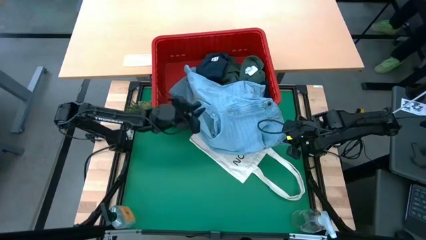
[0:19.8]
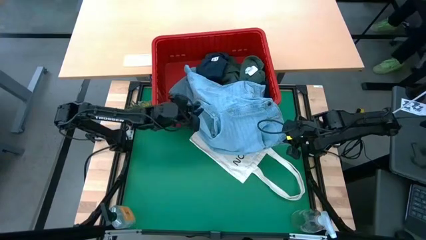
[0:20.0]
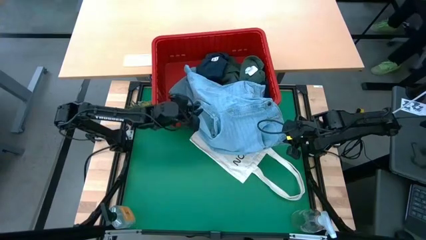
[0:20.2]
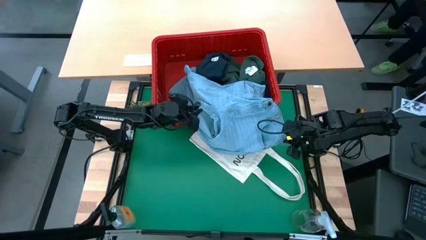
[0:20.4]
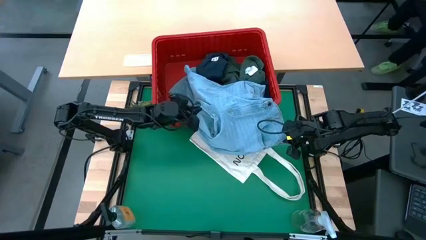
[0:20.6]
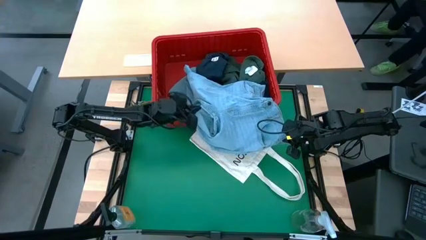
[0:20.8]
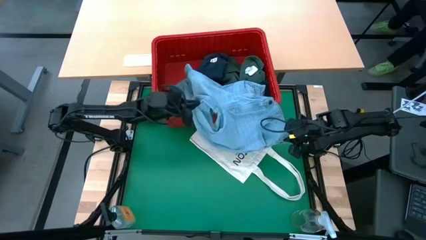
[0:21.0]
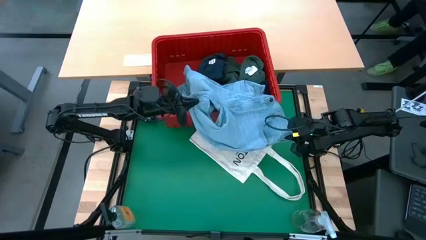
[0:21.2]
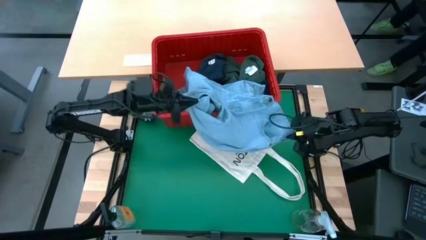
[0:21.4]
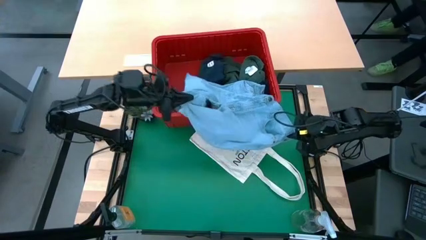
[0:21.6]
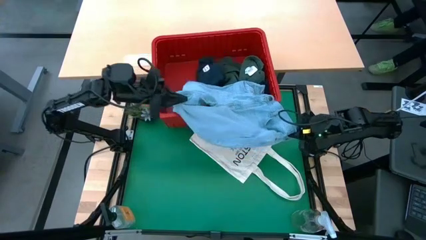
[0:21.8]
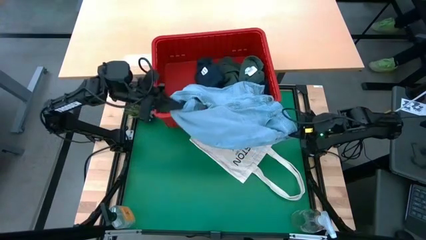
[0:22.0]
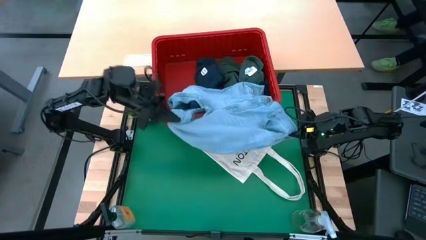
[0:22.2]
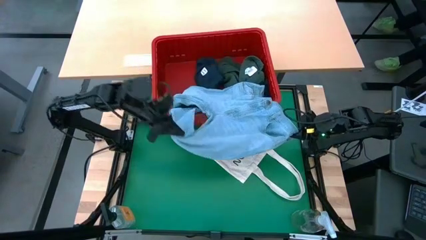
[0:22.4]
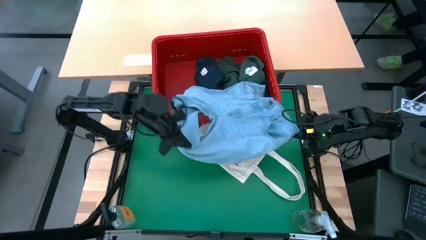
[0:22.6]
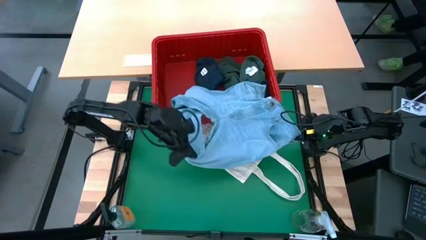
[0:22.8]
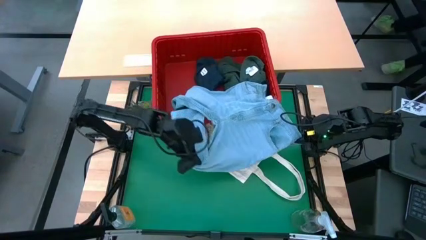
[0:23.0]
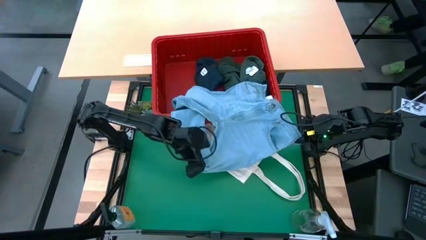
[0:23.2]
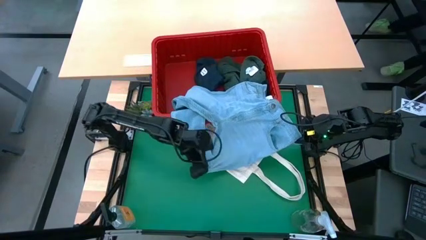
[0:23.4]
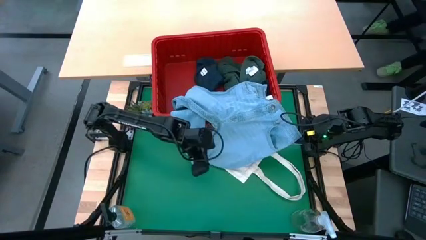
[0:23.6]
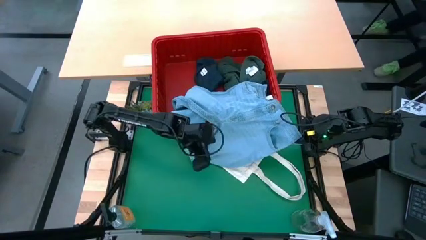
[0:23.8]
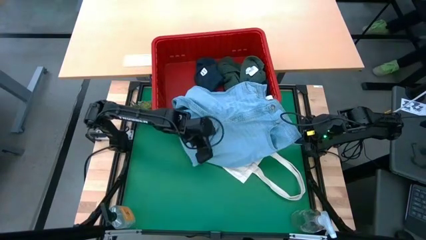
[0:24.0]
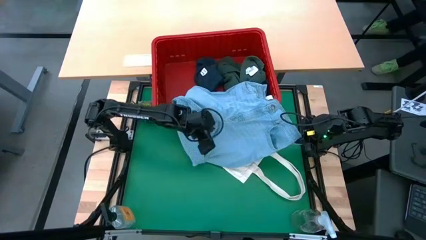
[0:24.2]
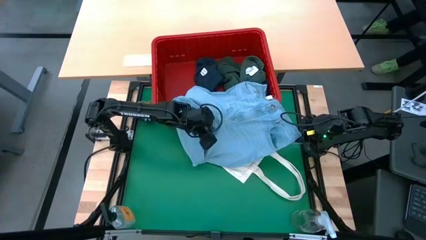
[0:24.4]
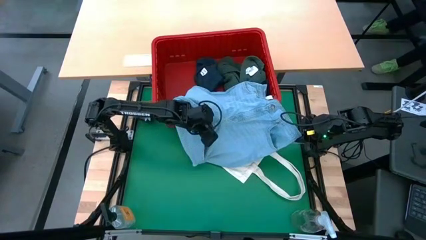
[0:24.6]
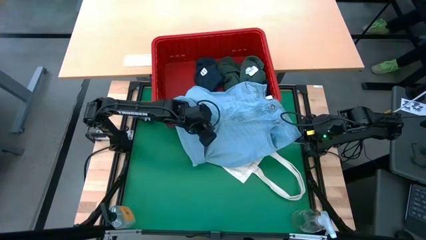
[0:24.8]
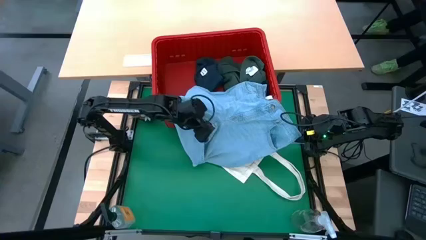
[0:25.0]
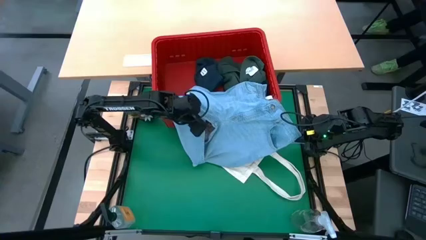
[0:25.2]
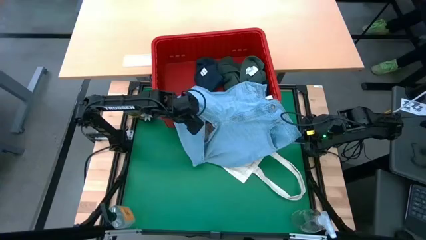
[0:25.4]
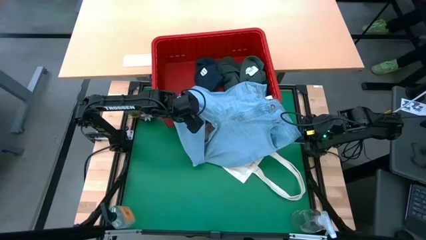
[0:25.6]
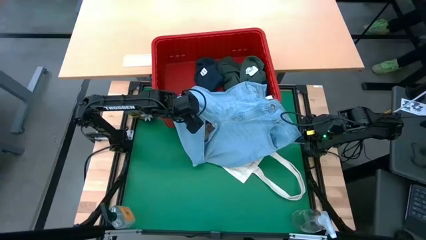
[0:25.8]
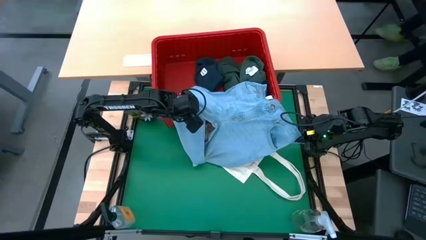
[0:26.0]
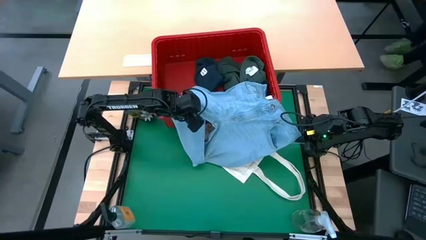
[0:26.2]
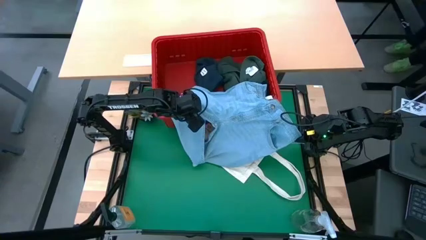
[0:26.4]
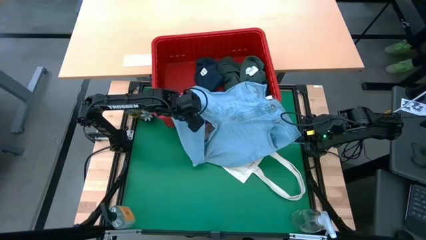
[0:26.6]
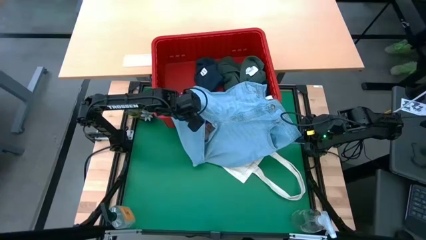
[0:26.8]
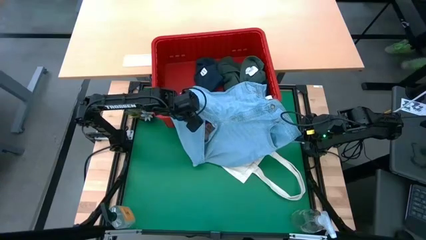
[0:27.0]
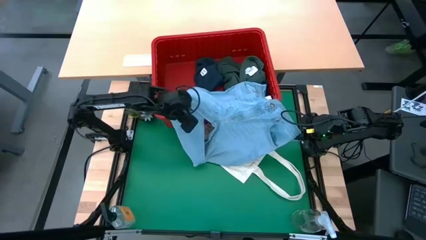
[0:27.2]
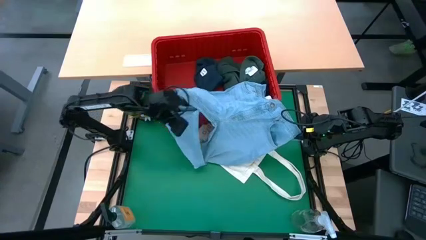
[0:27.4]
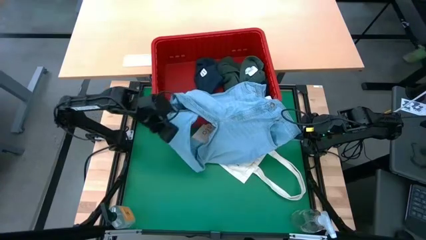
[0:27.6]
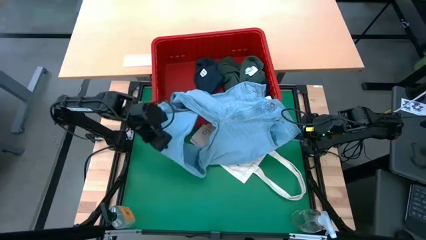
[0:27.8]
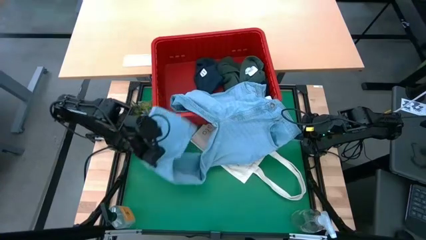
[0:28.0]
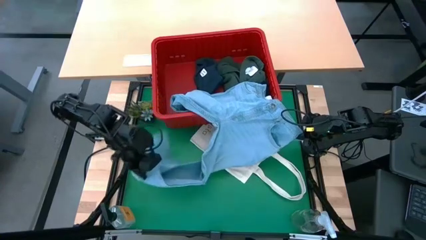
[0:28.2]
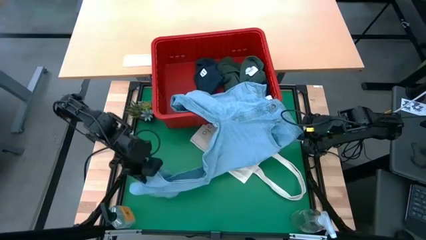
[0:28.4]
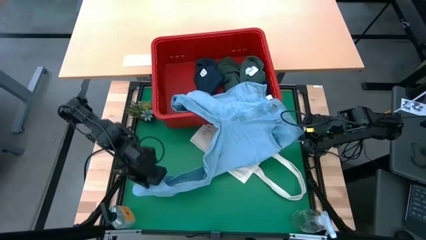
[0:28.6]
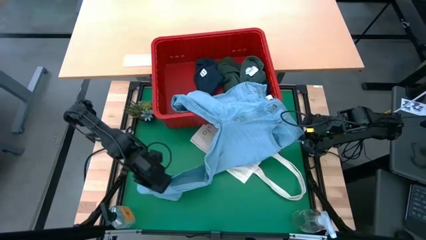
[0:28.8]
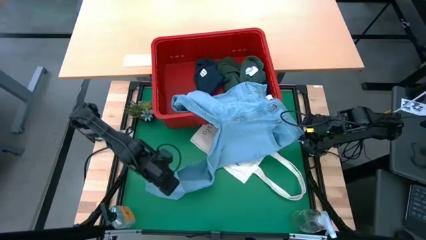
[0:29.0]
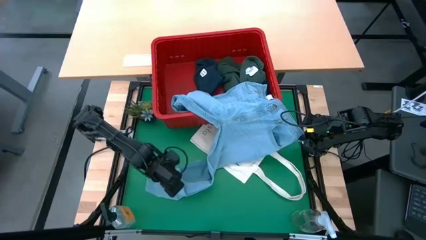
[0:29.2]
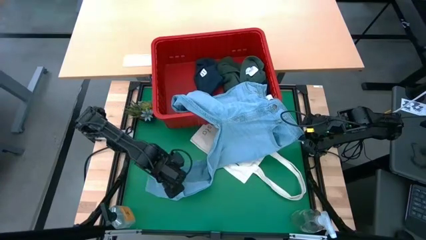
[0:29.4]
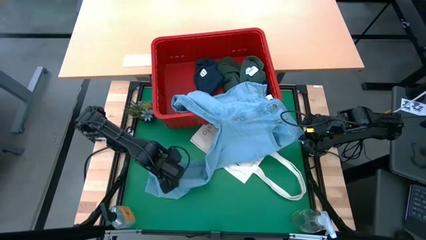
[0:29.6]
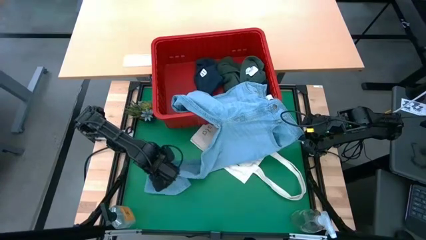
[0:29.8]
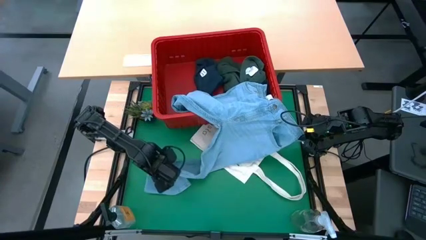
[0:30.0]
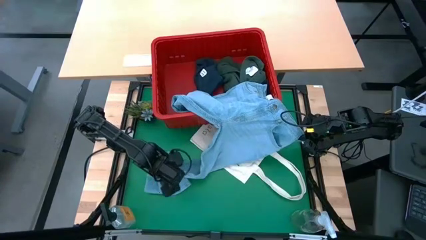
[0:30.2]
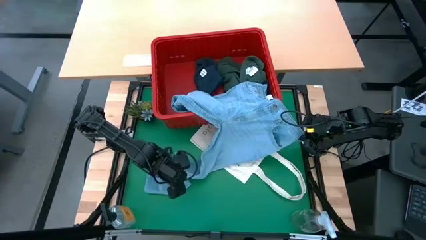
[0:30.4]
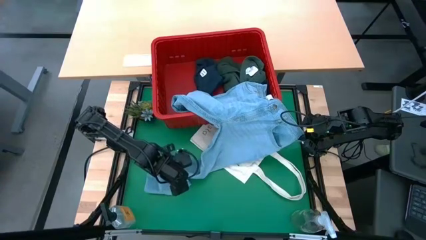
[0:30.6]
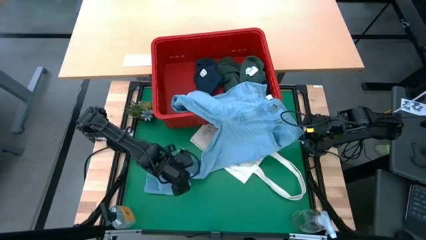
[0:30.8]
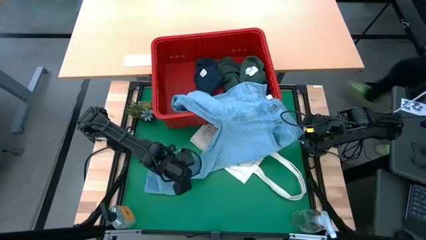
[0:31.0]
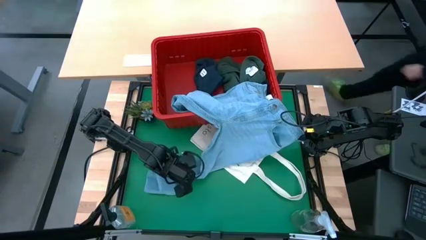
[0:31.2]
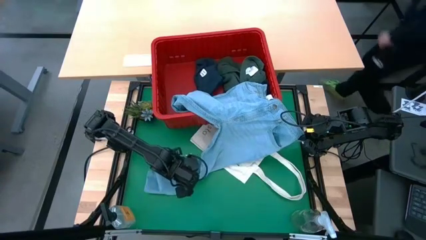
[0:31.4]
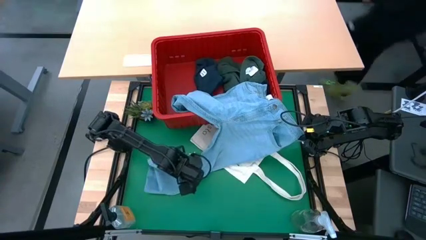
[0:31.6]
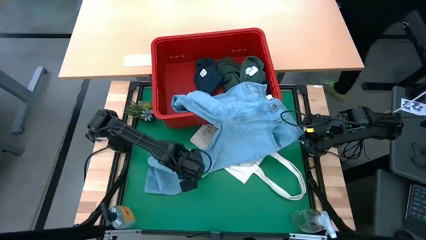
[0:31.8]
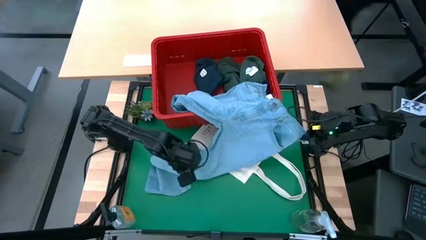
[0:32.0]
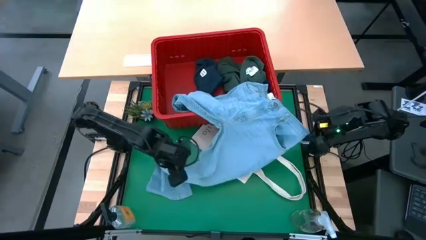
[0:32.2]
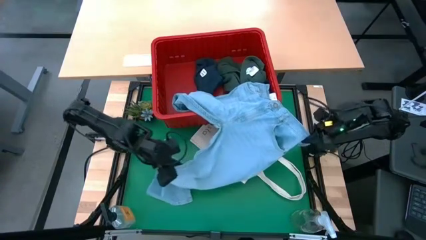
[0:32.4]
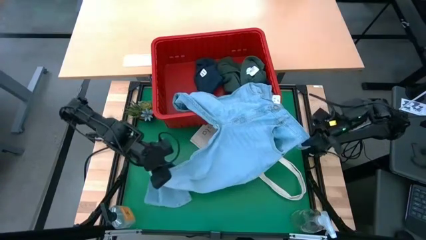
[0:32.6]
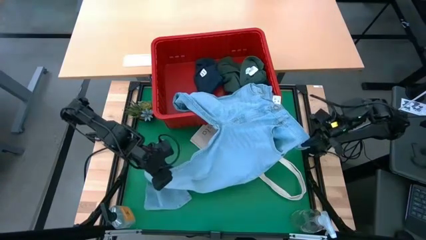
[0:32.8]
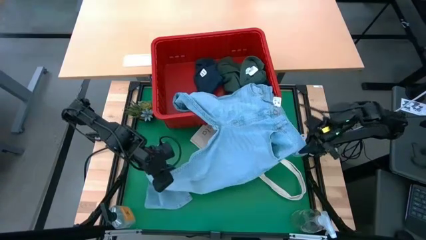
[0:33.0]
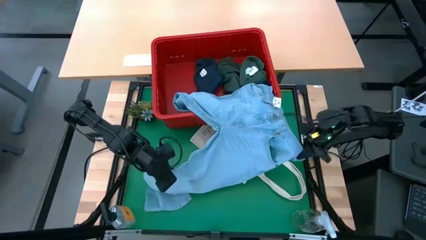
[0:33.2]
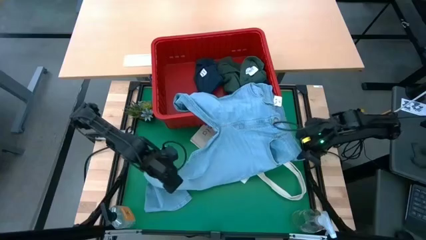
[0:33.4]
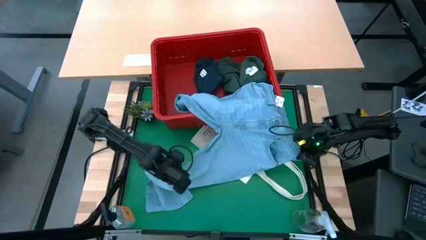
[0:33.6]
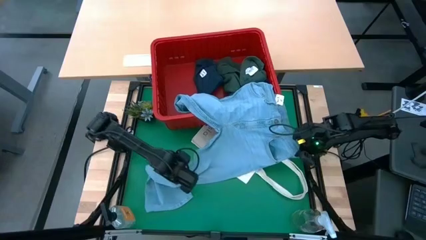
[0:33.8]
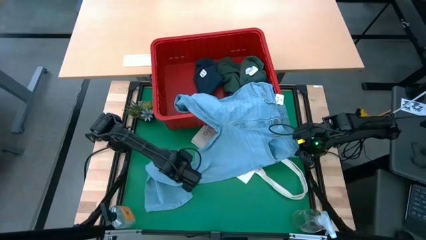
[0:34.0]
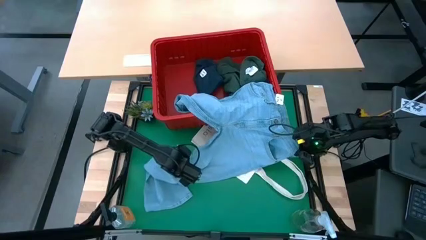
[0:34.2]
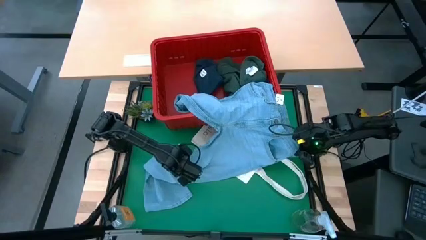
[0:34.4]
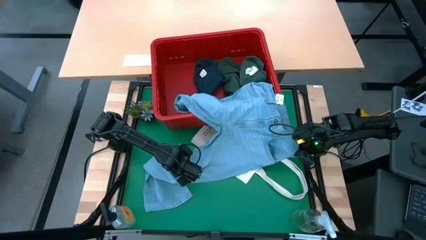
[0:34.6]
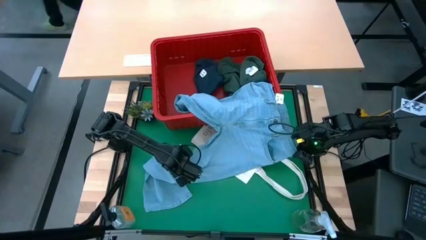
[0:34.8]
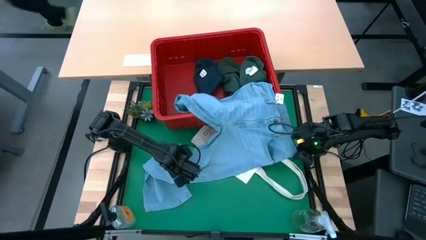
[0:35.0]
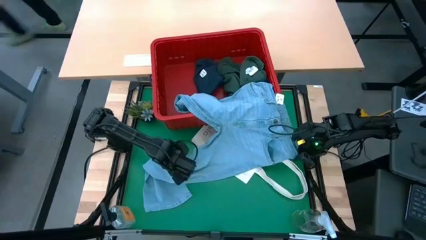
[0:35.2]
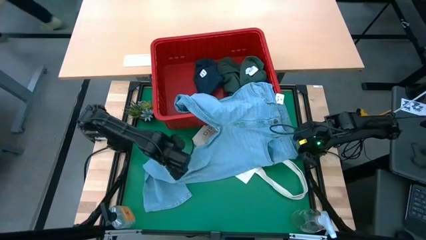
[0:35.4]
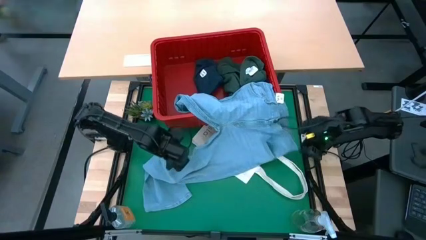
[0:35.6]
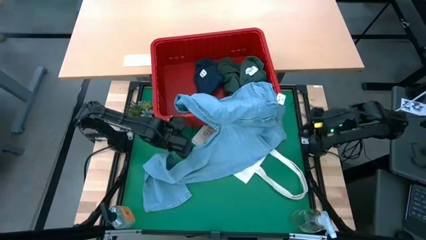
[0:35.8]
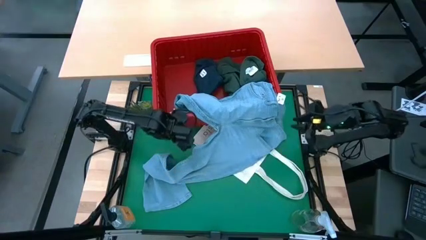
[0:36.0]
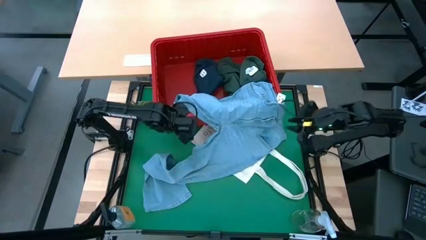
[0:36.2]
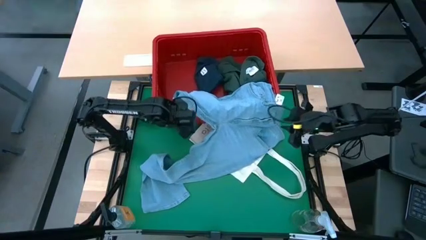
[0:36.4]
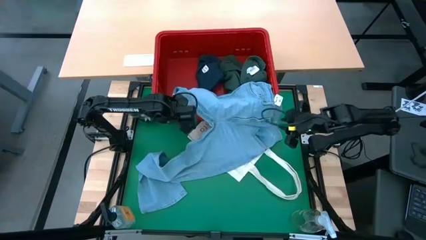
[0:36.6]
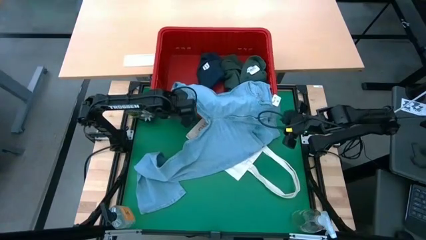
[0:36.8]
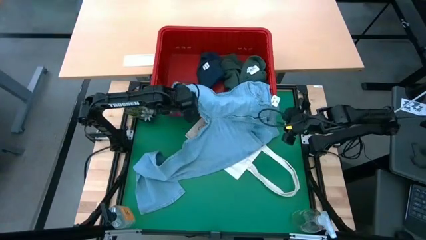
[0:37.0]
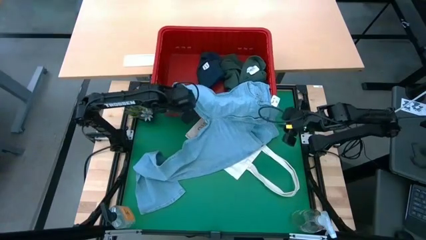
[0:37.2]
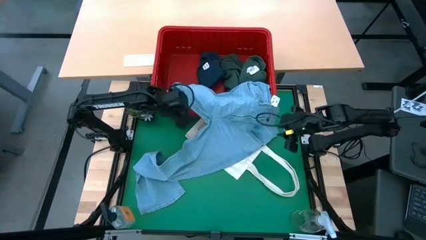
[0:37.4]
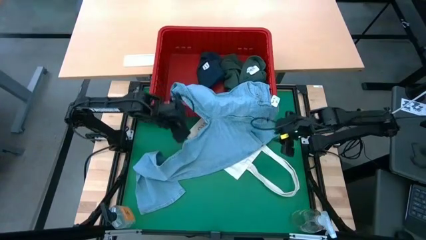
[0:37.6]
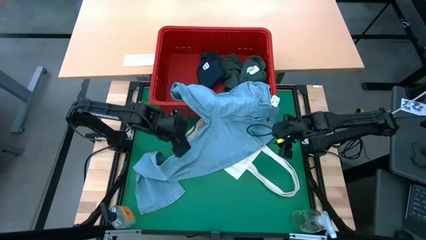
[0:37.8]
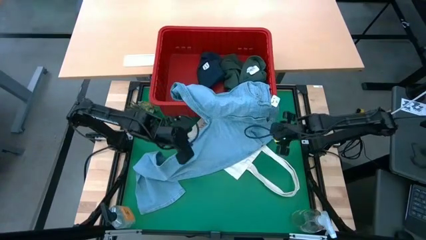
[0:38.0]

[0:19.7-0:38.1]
Task: Fold laundry
Fold the light blue pants
